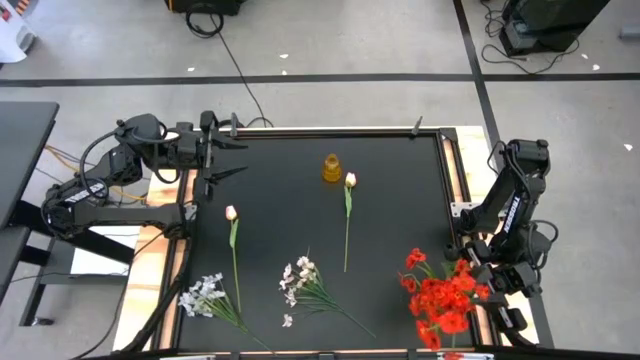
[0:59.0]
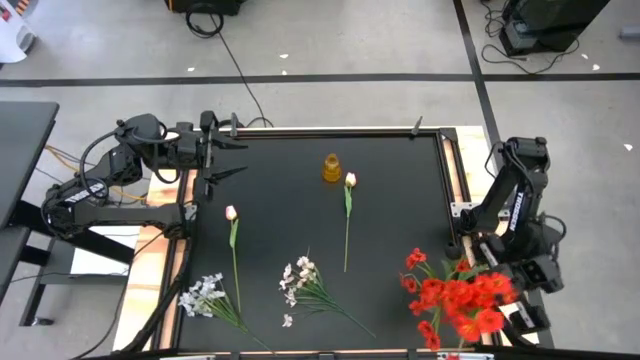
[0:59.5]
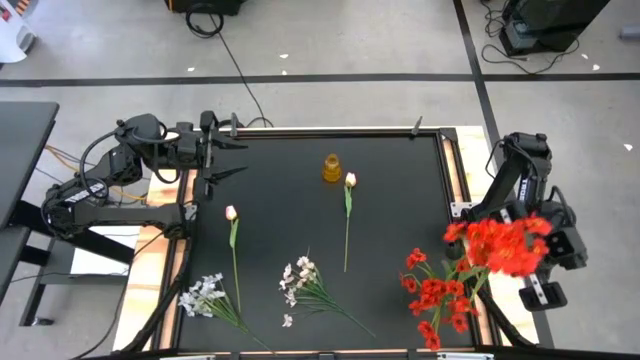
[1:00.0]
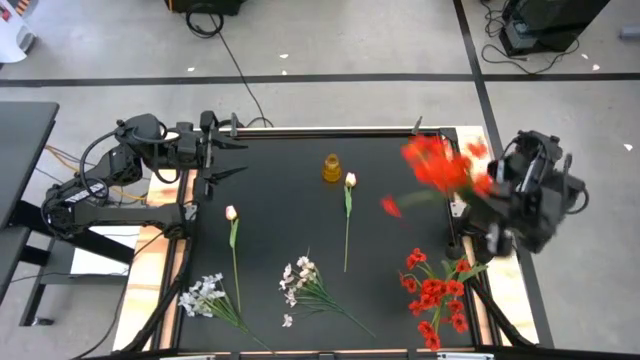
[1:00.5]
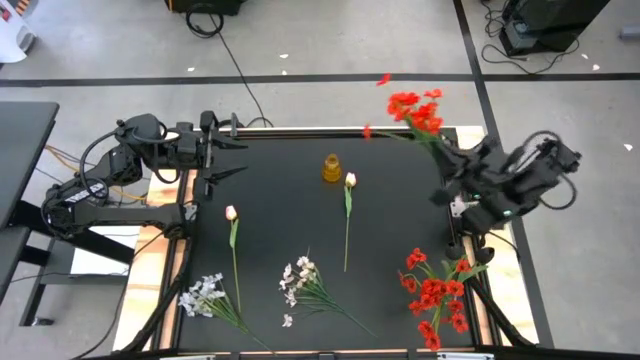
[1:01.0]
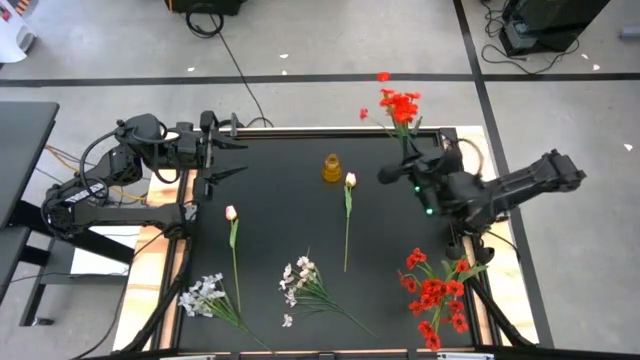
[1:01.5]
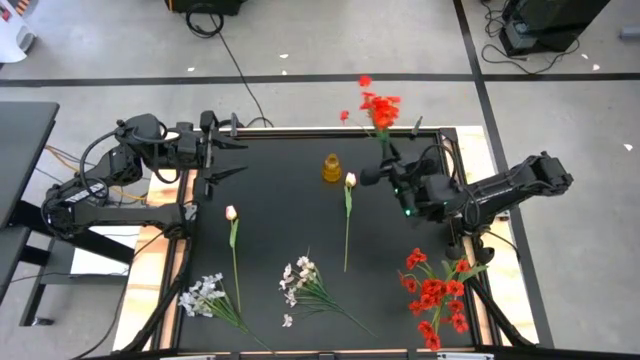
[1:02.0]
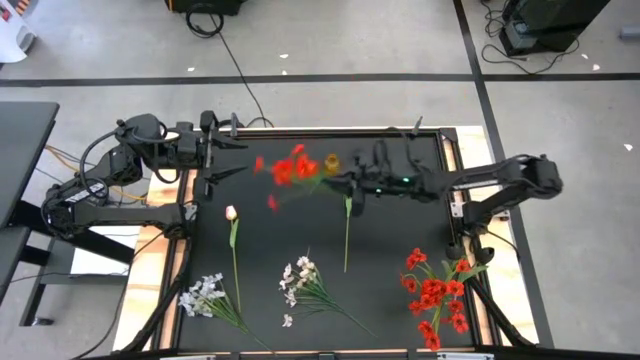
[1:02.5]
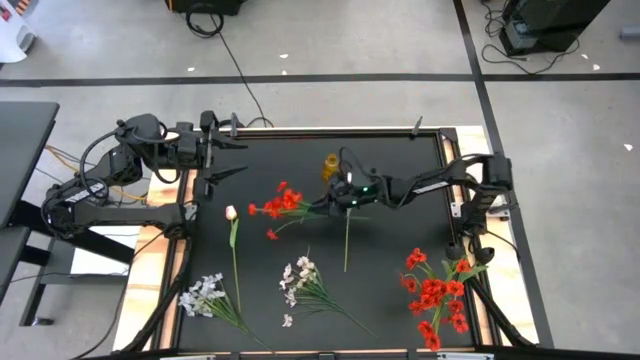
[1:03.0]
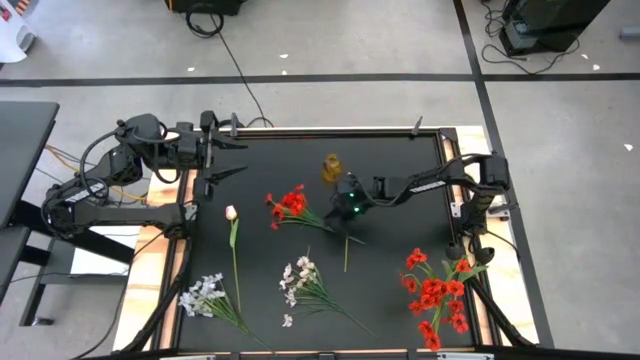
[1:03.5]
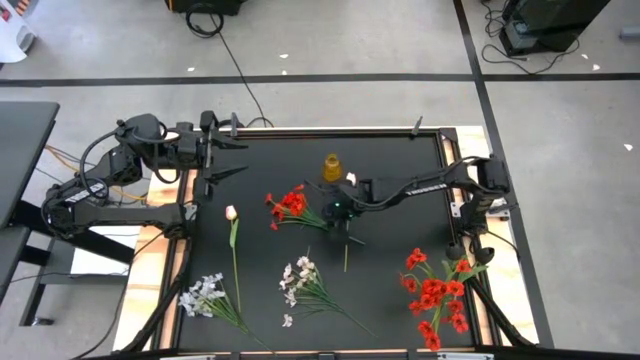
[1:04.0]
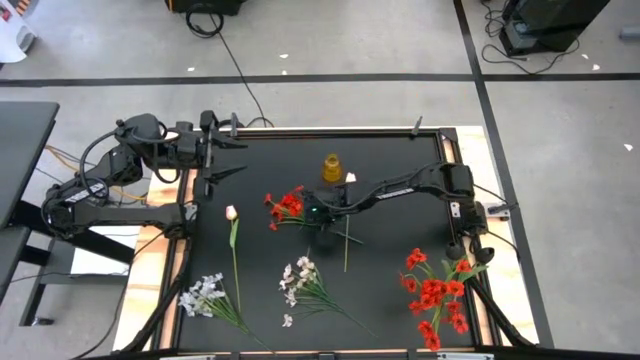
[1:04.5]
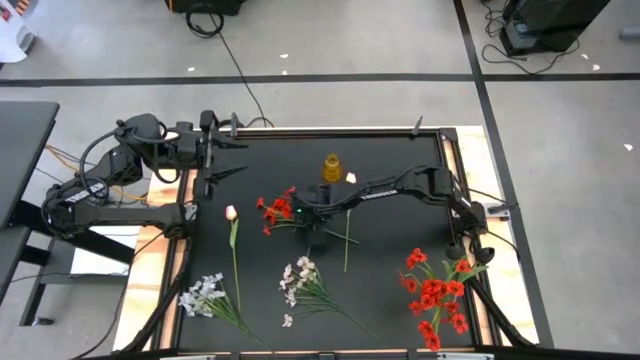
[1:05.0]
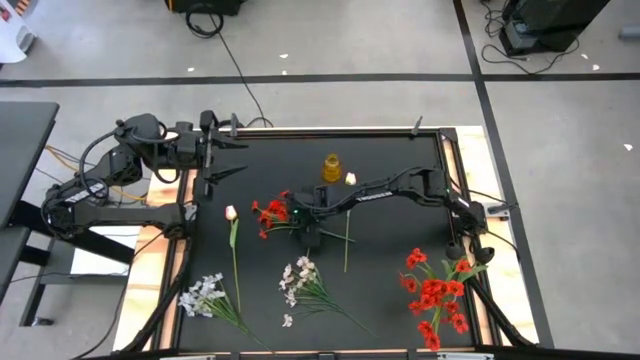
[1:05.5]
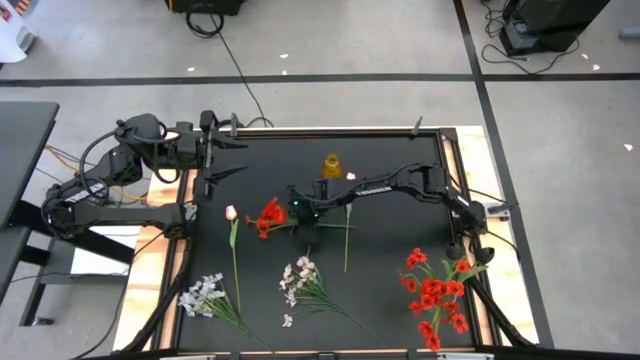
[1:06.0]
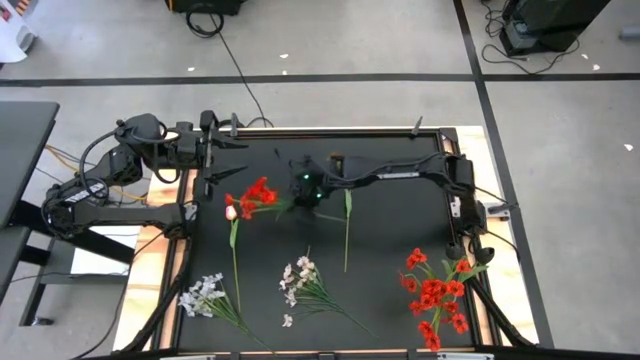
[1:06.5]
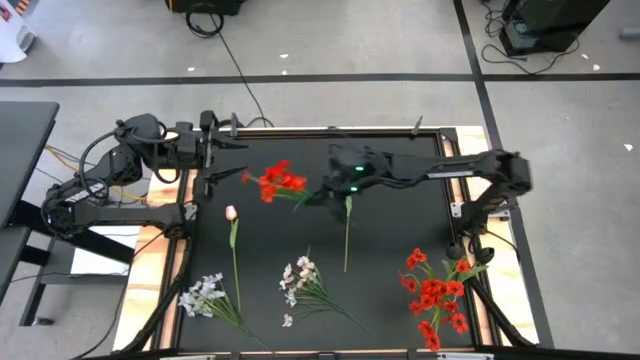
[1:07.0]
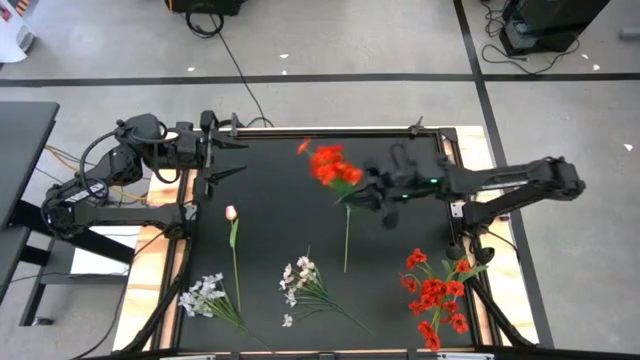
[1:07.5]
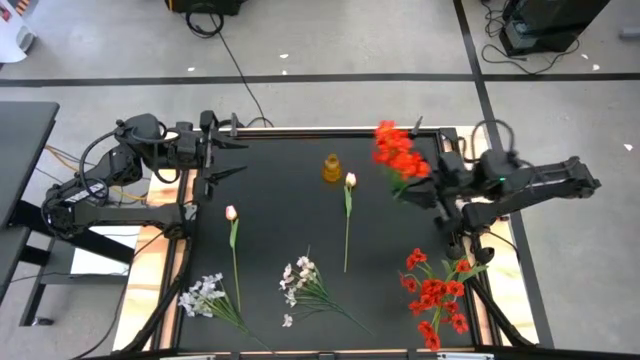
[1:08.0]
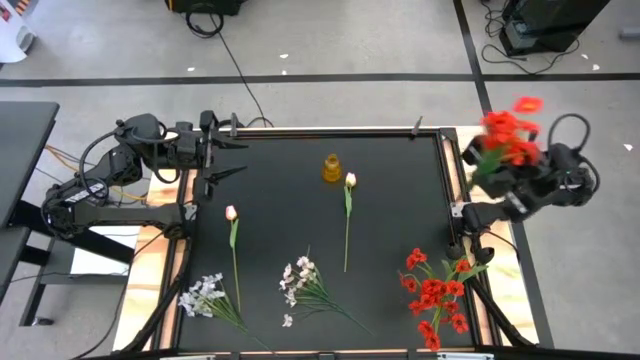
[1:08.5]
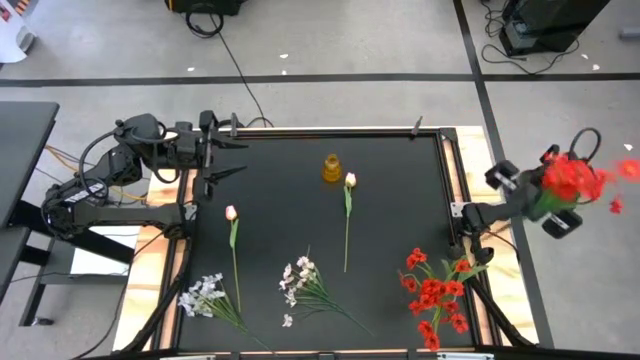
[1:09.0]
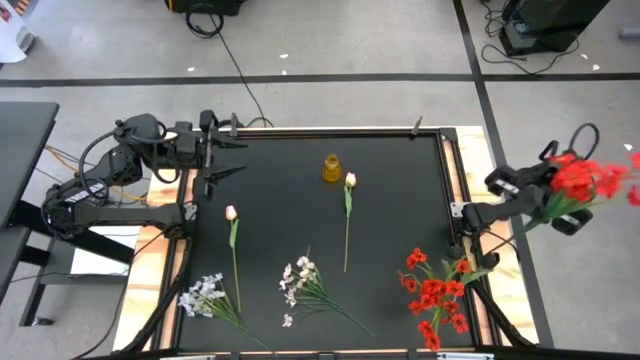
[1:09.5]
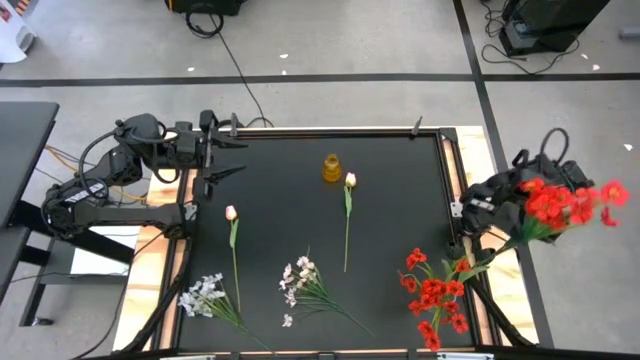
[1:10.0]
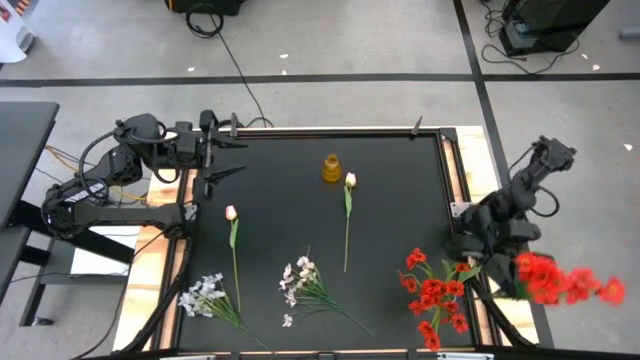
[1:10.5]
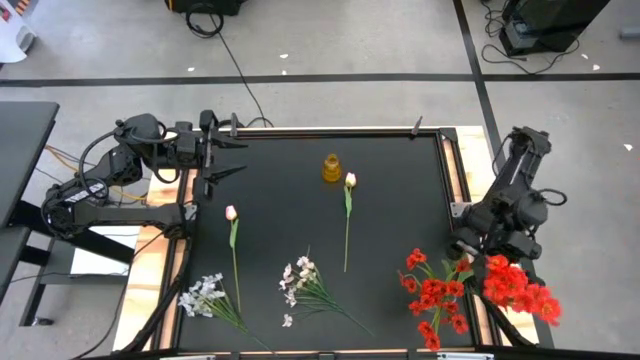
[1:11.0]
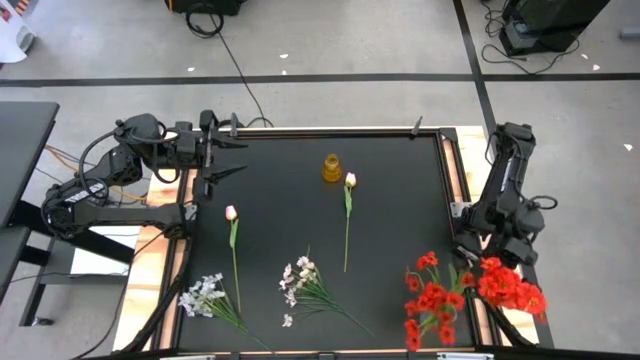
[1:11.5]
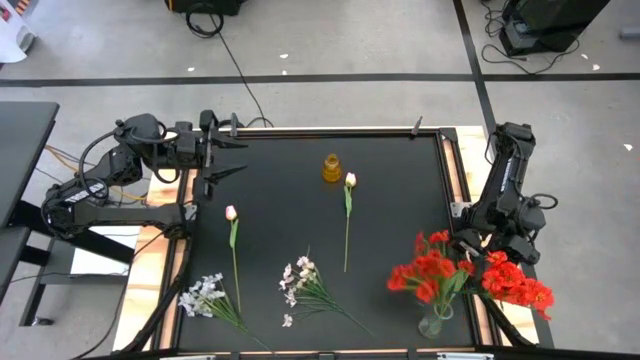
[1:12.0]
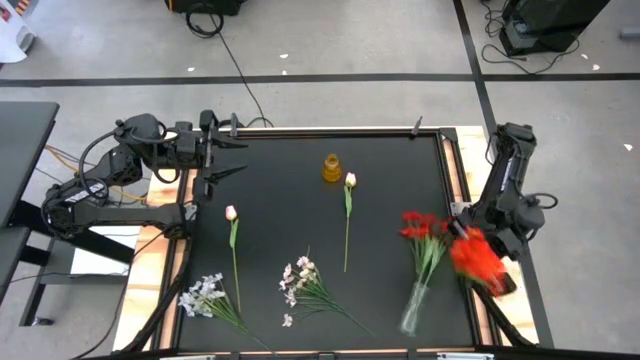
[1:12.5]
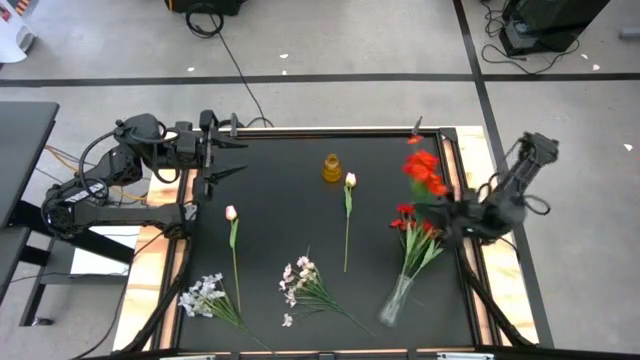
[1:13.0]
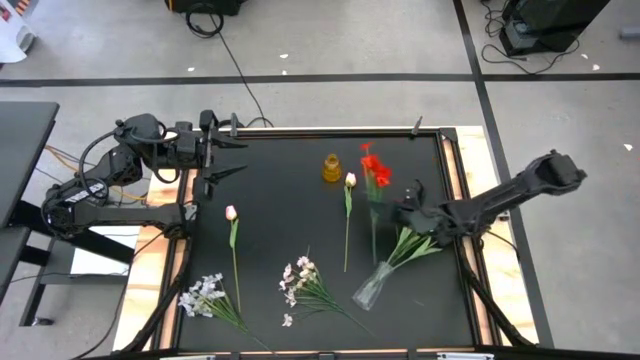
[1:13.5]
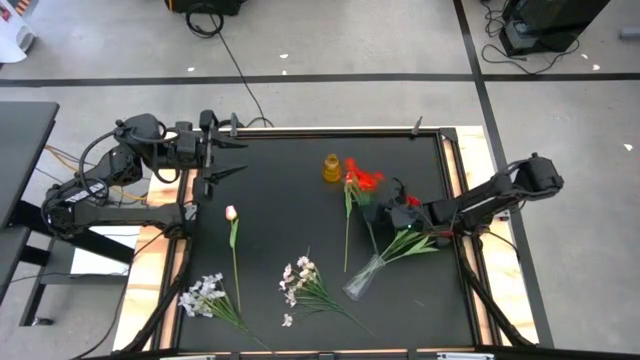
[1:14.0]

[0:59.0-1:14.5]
Task: Sort flowers into vase by color
Put the red flowers into the transparent vase

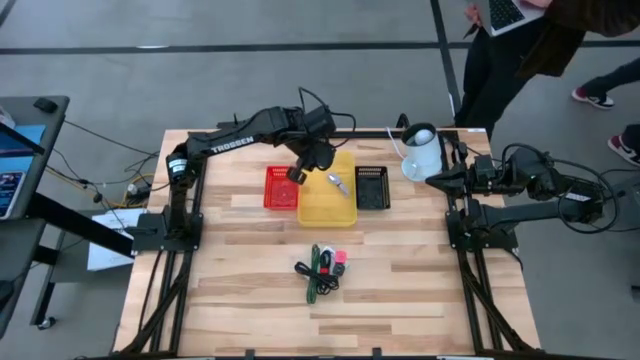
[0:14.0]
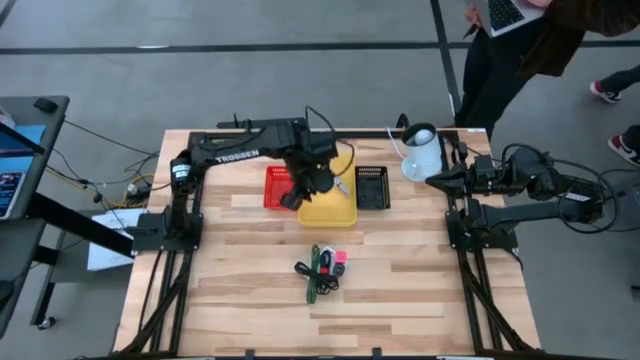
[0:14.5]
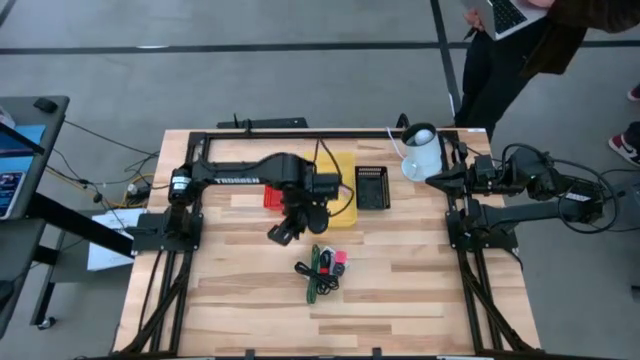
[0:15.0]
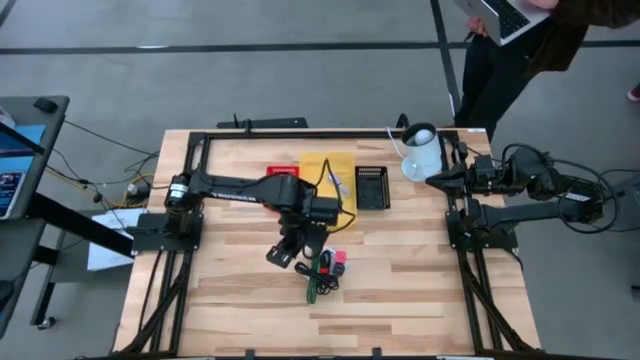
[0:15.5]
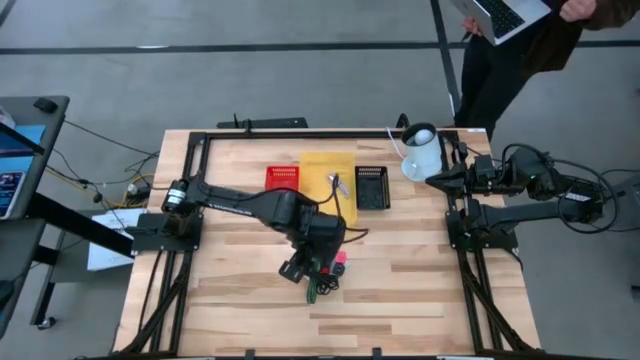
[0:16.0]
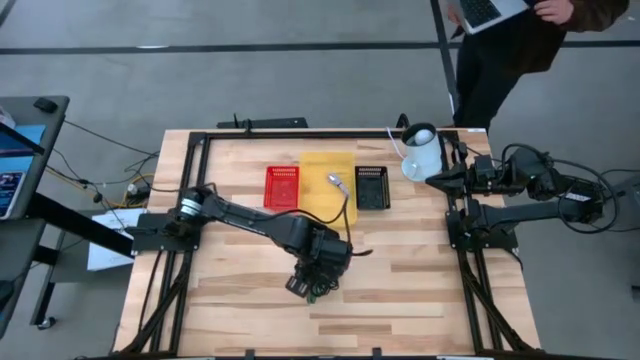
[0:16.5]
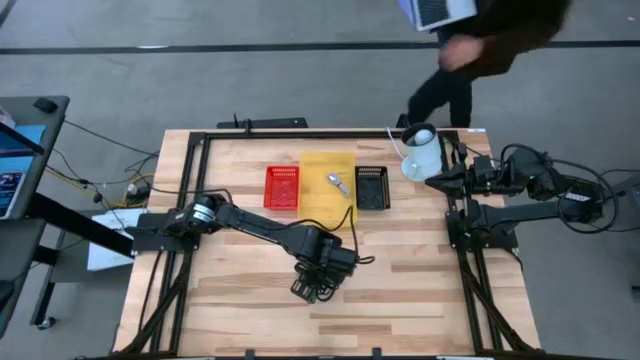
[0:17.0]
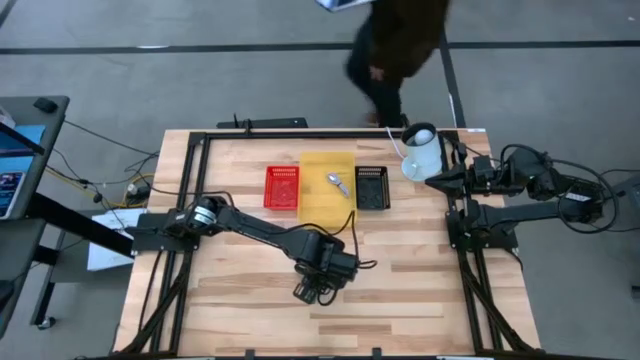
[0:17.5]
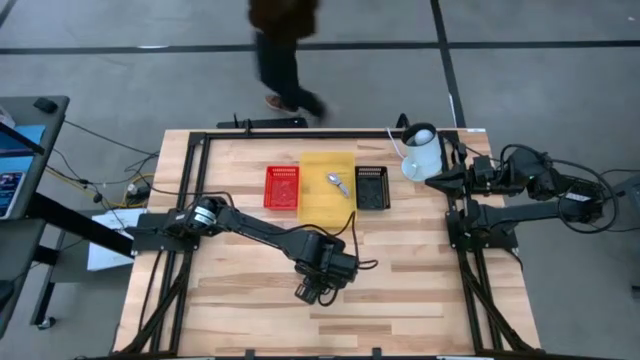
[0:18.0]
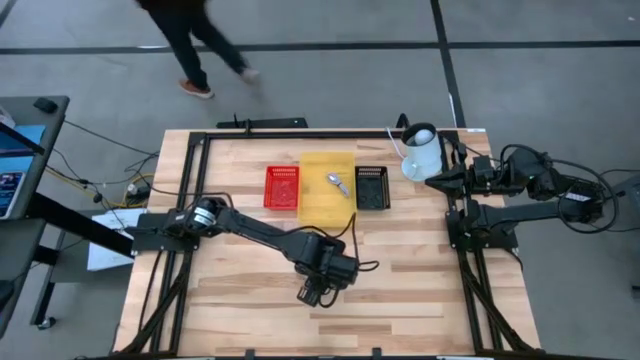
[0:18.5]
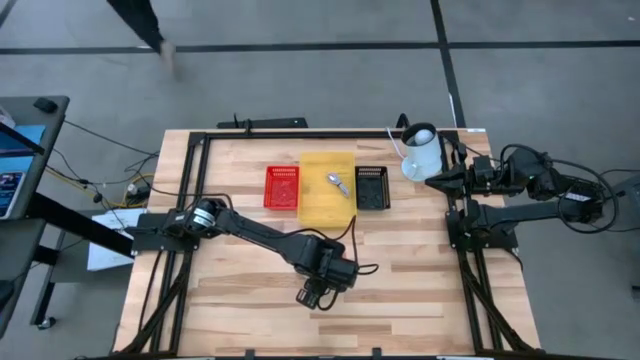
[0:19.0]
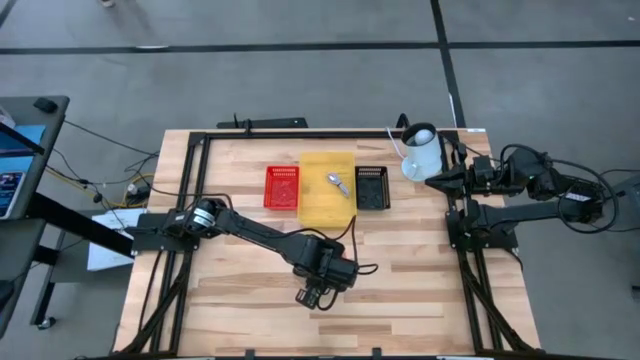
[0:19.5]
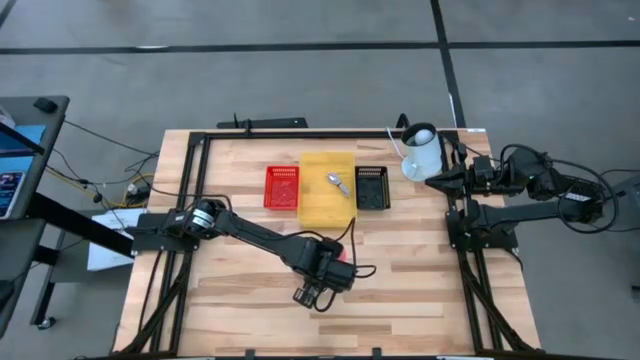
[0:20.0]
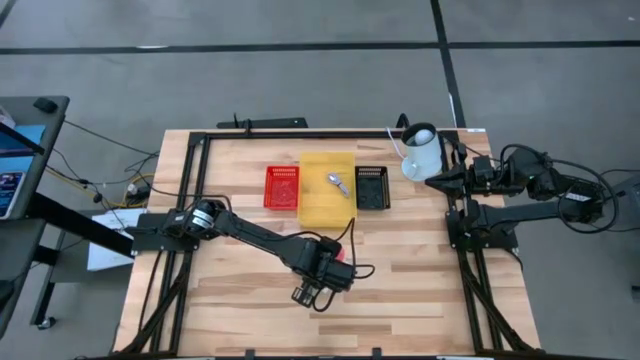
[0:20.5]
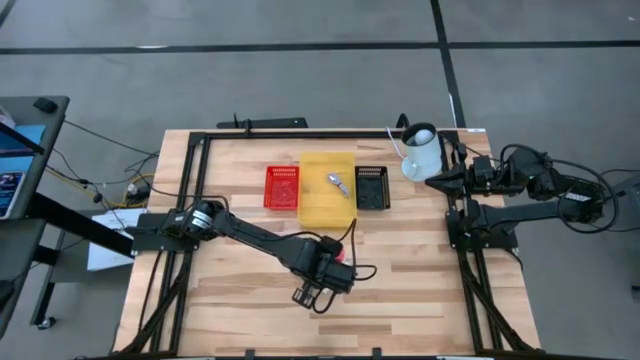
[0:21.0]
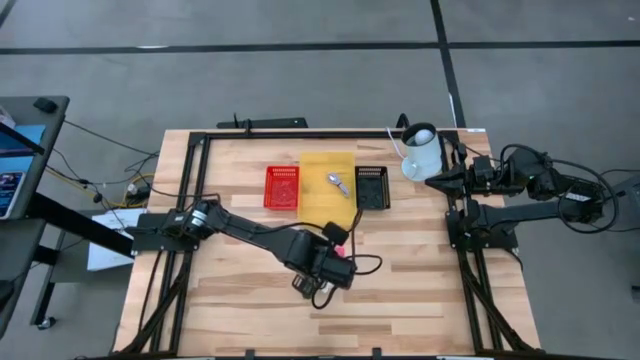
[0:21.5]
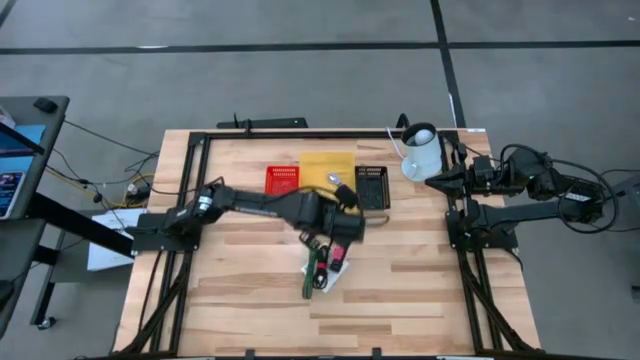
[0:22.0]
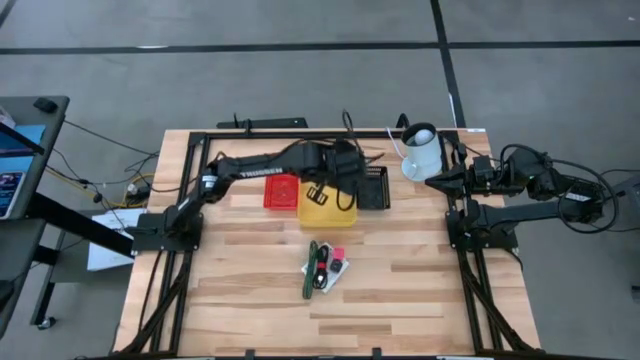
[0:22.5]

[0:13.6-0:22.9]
Task: Pick and place items into bin
Put the black charger cable in the yellow bin
